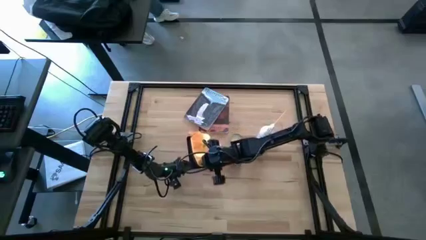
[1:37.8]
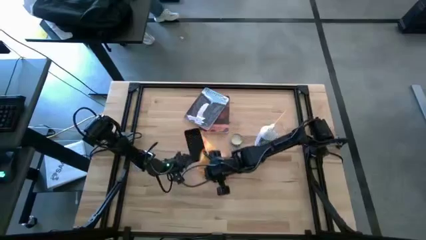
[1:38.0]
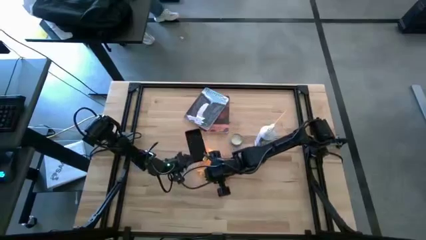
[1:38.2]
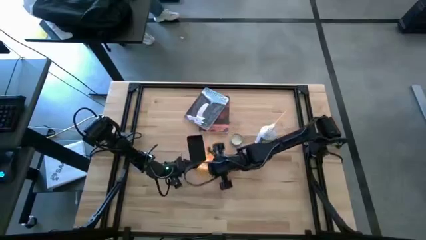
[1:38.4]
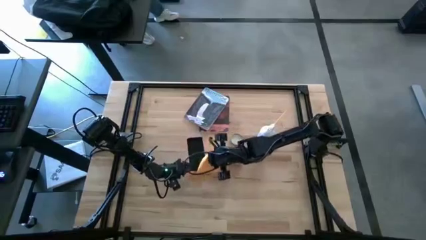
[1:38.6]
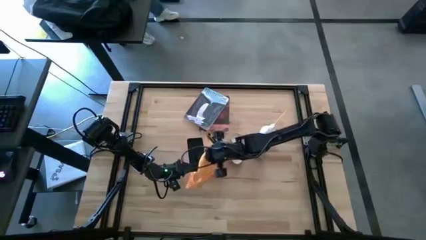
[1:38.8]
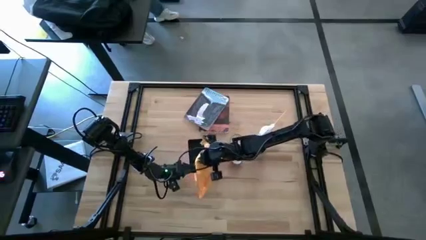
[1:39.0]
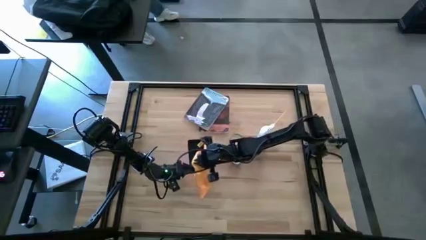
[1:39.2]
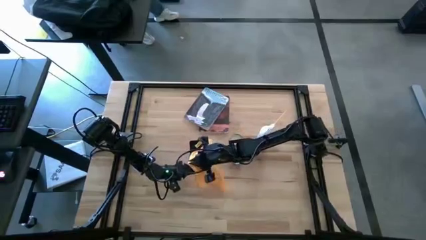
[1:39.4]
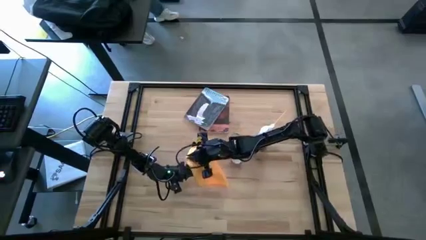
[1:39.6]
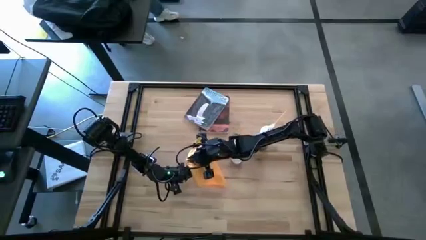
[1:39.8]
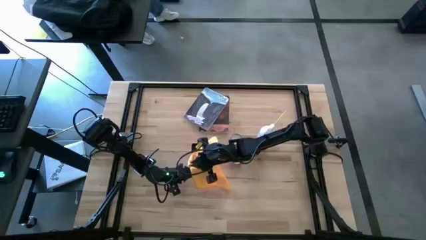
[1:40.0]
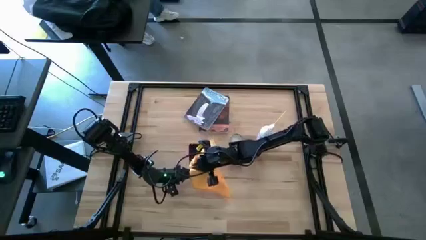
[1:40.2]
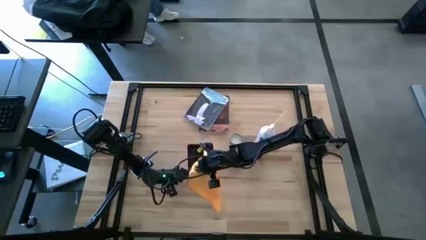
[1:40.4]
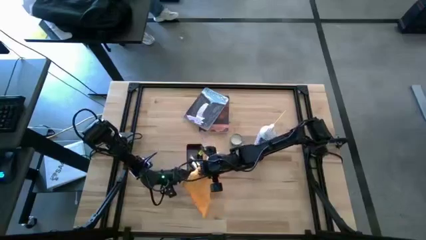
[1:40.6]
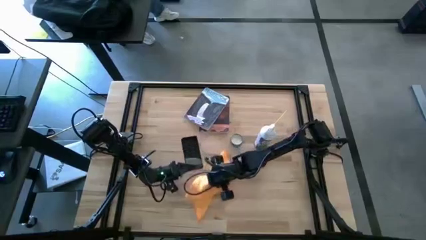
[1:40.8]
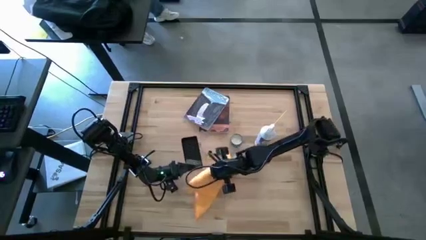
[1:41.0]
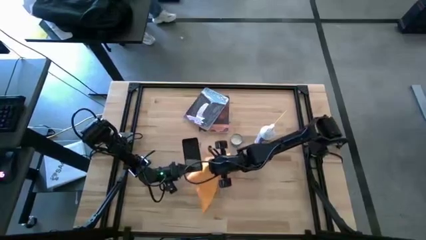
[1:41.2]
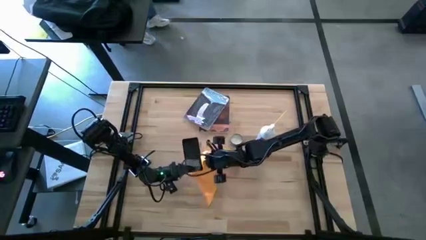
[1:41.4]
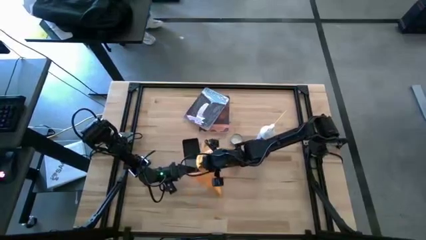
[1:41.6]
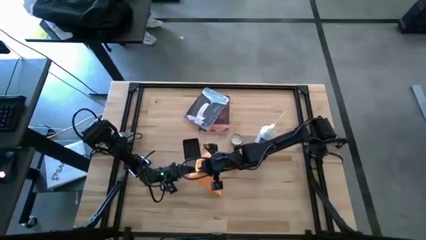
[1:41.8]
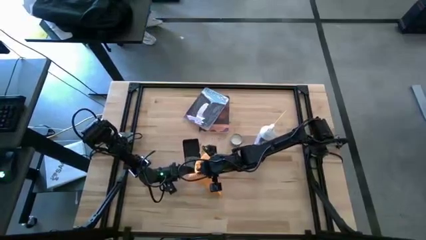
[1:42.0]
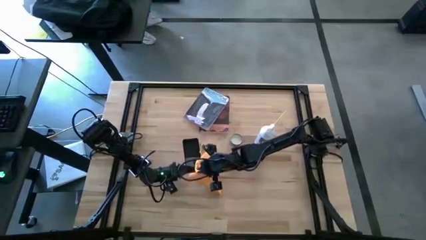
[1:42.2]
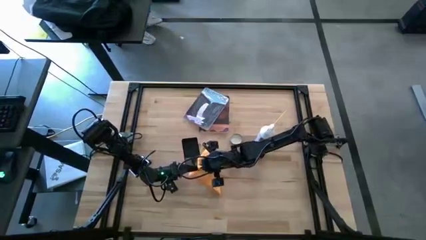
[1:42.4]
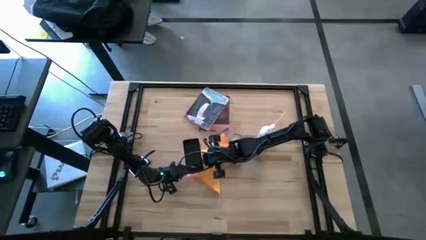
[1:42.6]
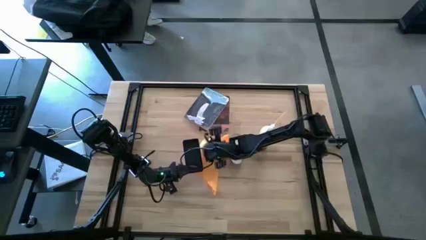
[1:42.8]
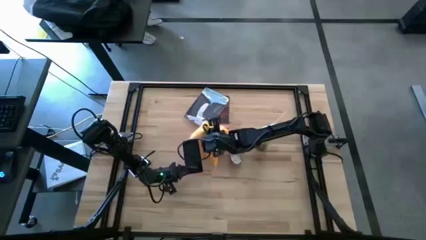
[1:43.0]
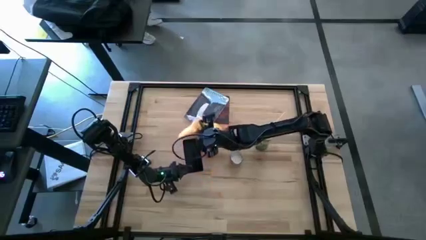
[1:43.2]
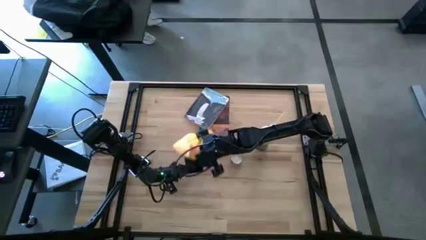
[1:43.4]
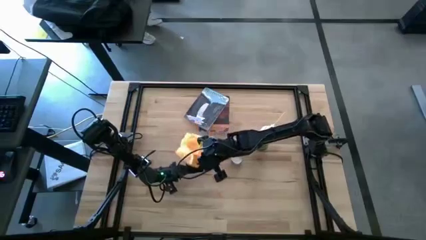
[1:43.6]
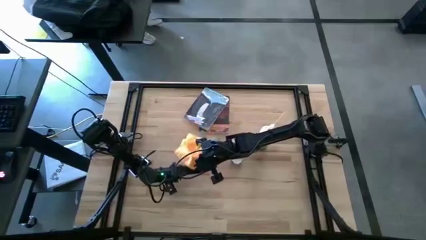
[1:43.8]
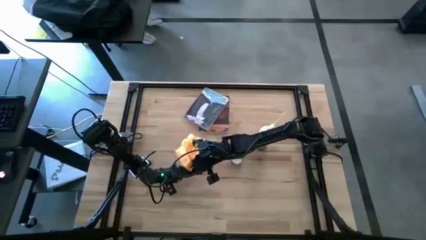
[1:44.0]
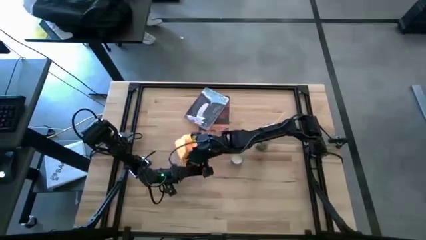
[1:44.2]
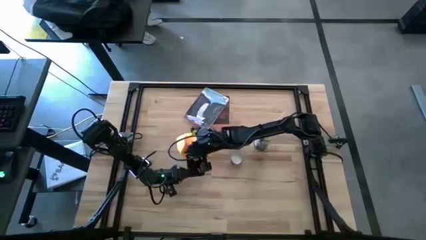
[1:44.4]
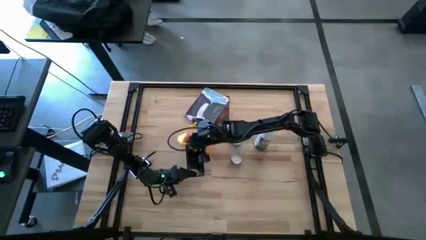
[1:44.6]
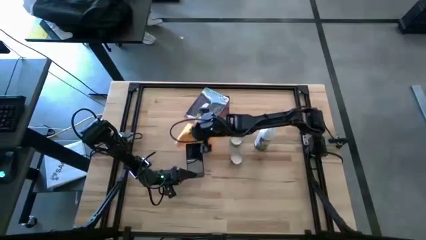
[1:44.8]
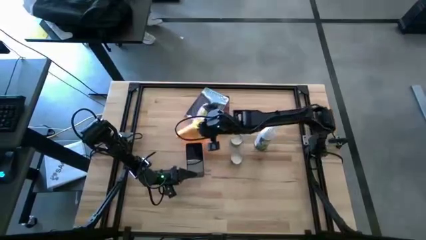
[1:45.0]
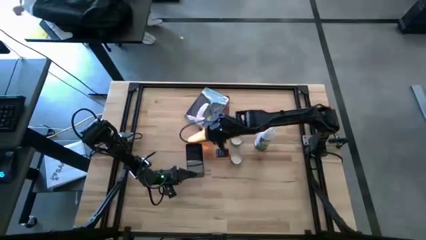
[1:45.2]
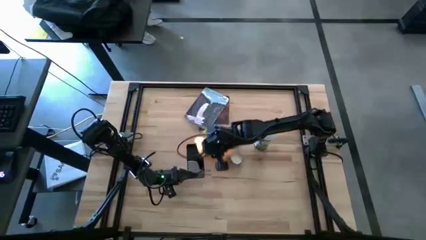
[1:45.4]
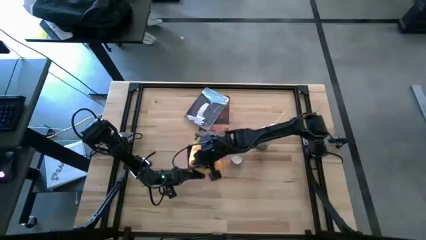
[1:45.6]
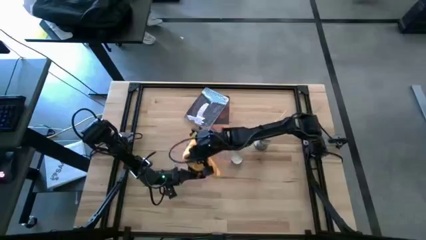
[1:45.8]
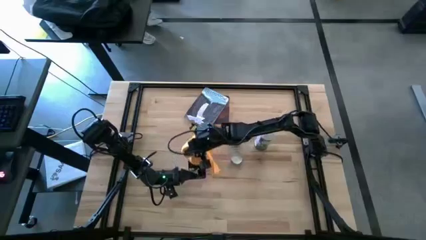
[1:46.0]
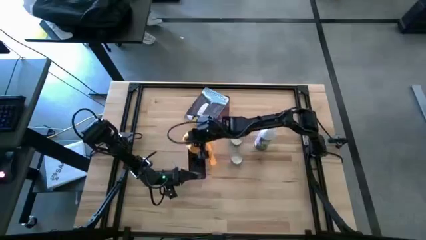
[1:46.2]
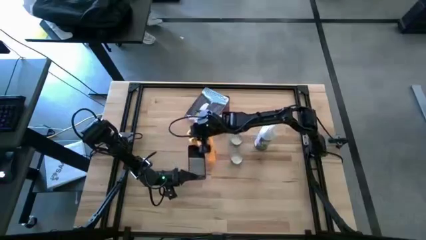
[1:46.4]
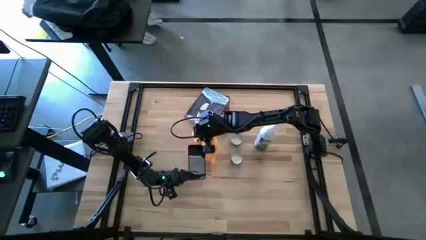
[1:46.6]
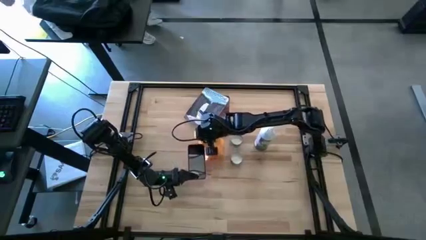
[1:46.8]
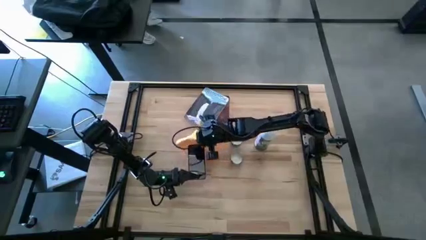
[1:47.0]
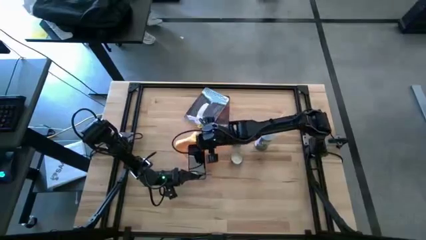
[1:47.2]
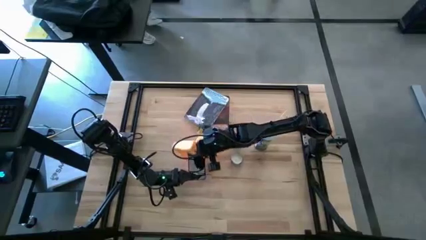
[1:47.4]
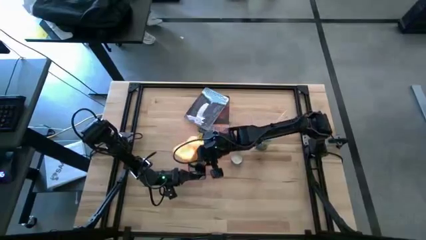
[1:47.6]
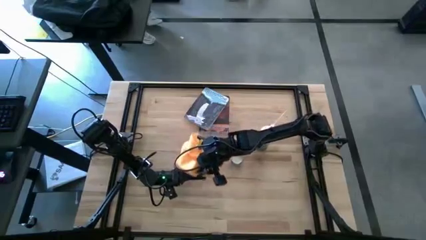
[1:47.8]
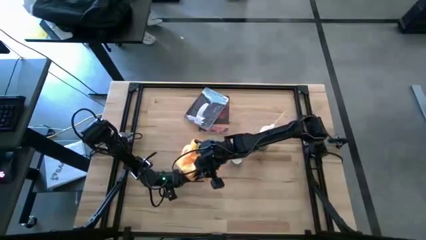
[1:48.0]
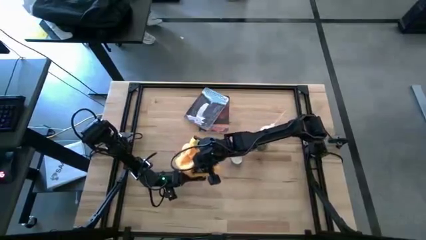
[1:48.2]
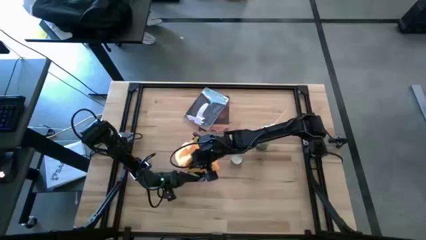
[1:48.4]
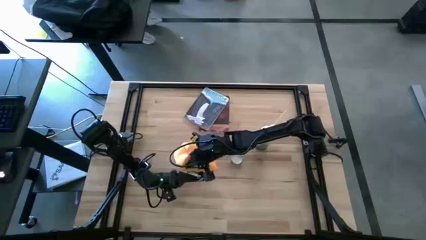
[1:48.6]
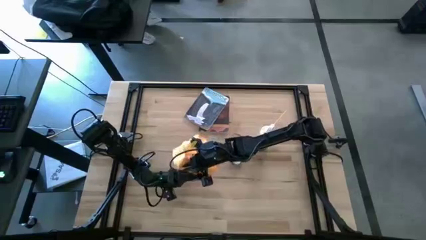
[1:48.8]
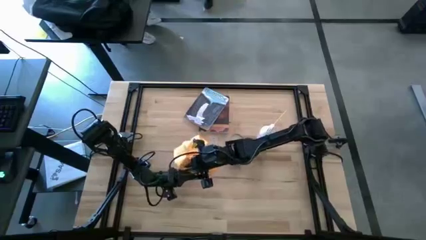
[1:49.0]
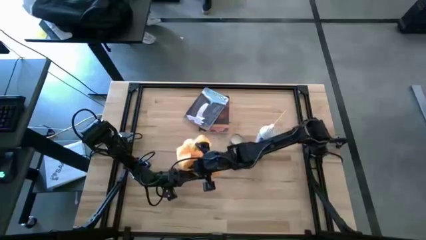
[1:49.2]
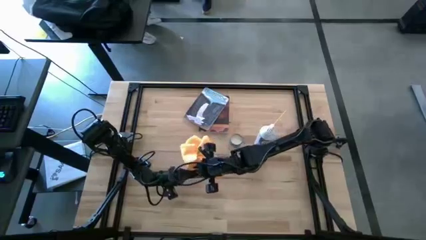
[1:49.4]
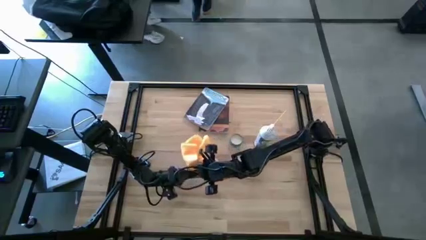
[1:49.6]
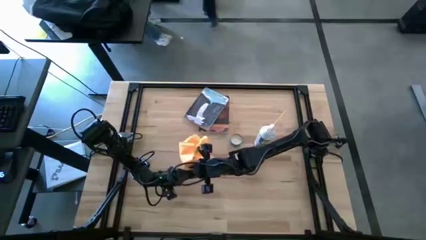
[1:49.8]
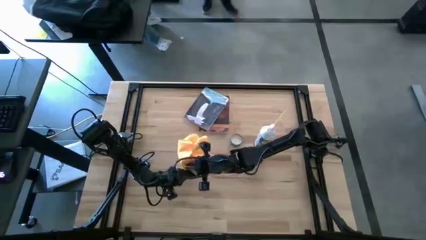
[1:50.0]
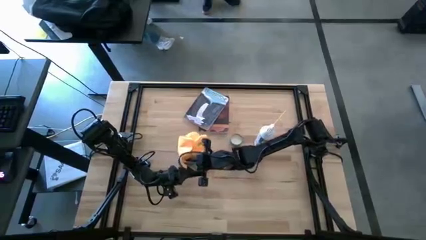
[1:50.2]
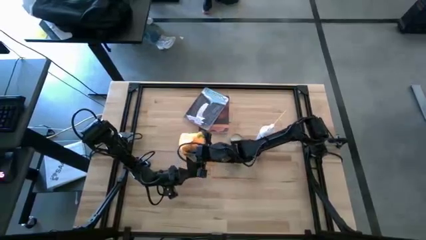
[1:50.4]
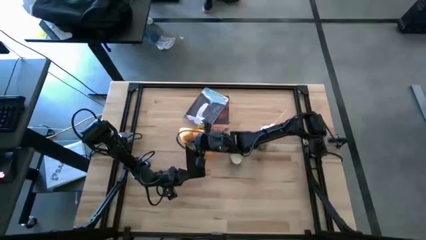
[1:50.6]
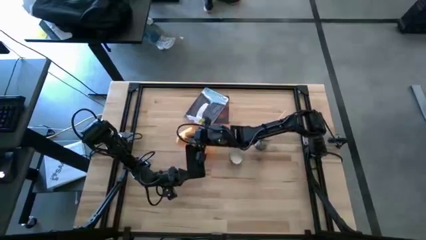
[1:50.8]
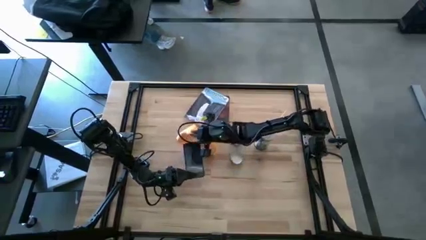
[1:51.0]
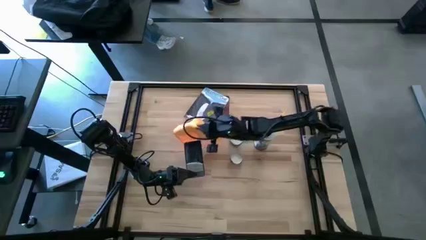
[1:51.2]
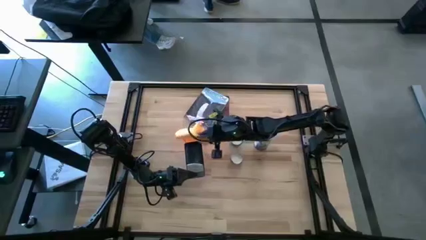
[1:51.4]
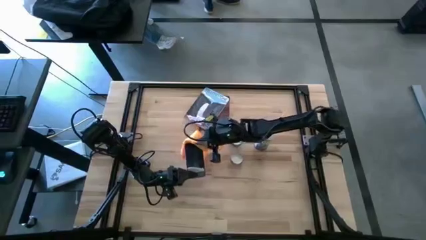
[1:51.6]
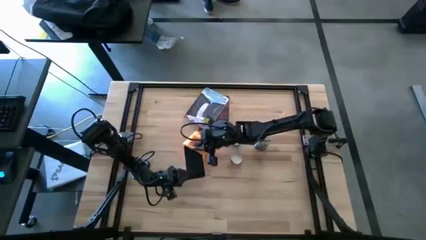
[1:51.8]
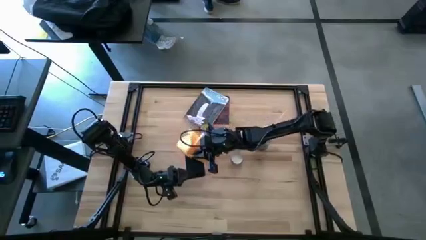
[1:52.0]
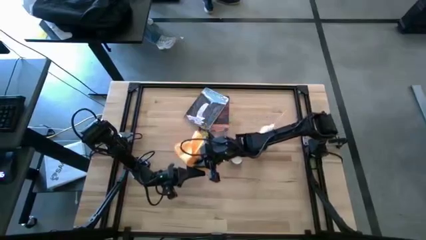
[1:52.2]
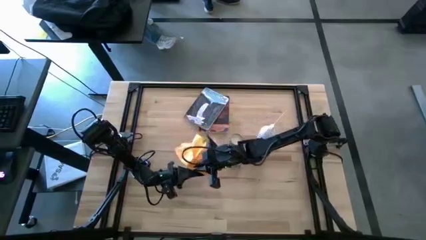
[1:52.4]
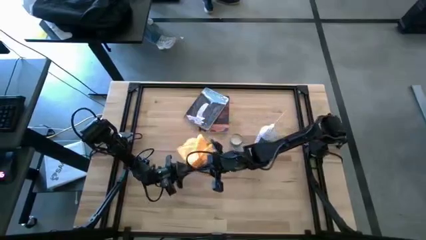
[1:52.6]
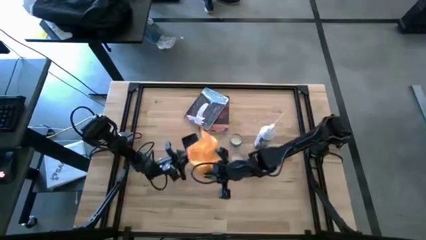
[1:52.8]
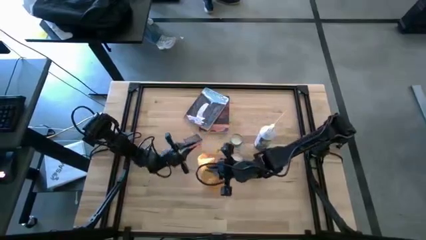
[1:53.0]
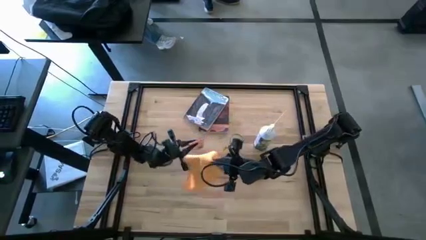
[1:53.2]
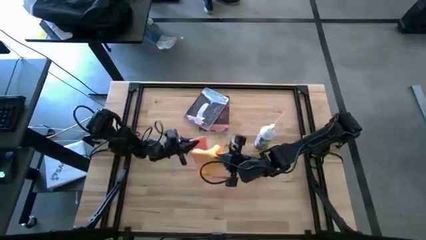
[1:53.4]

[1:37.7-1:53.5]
Task: Apply microfiber cloth
Wipe the pink phone with the orange microfiber cloth
